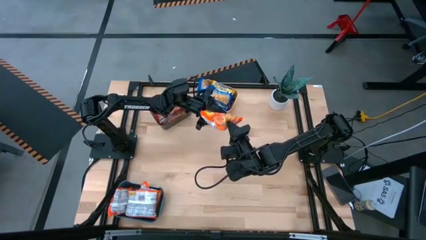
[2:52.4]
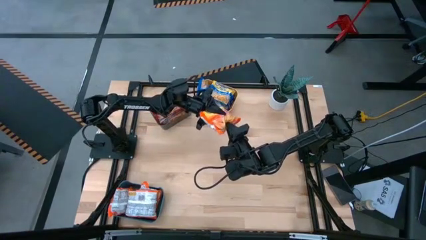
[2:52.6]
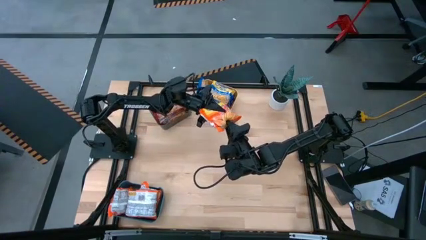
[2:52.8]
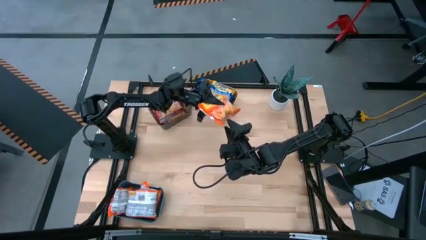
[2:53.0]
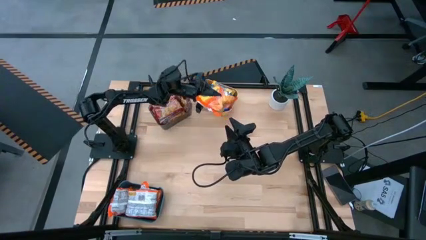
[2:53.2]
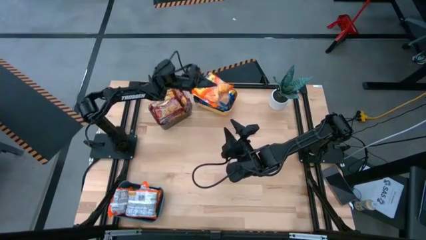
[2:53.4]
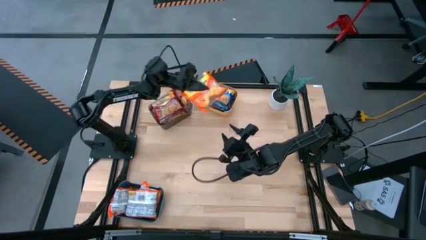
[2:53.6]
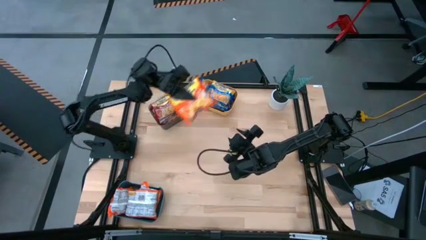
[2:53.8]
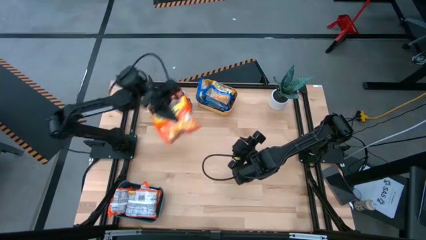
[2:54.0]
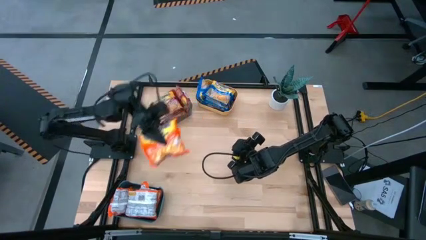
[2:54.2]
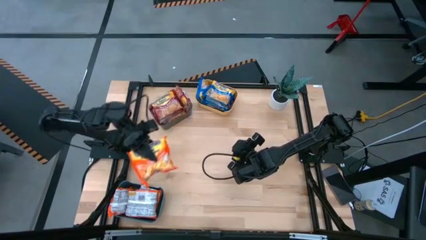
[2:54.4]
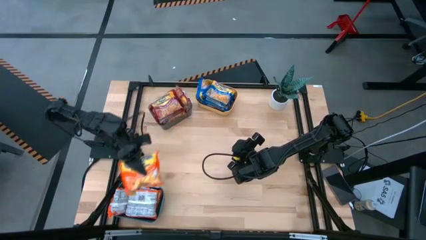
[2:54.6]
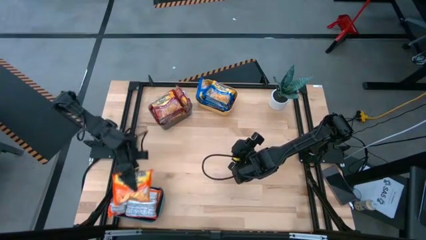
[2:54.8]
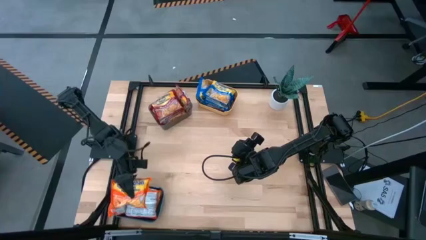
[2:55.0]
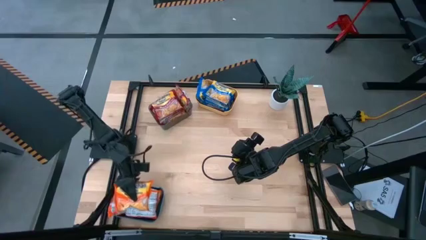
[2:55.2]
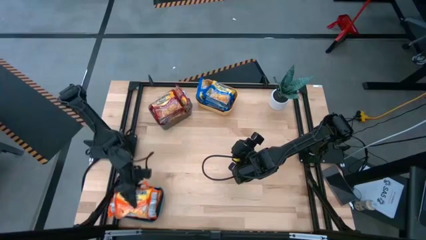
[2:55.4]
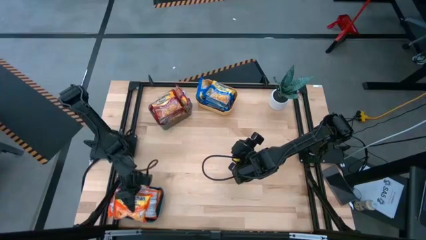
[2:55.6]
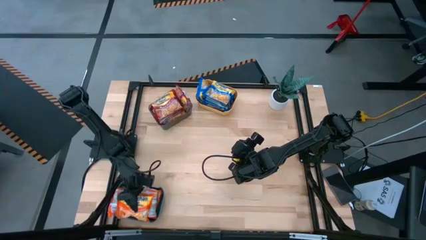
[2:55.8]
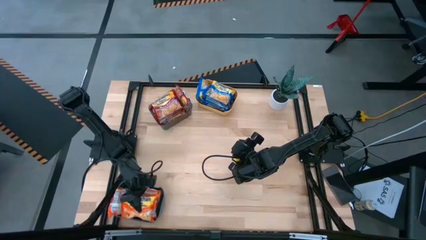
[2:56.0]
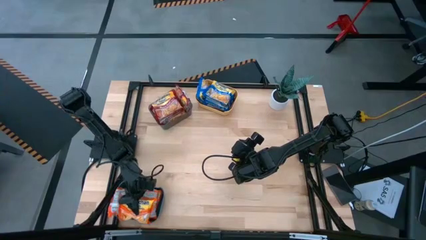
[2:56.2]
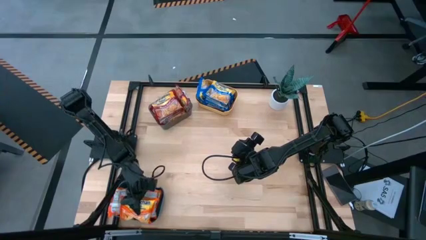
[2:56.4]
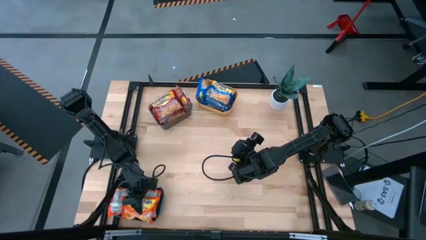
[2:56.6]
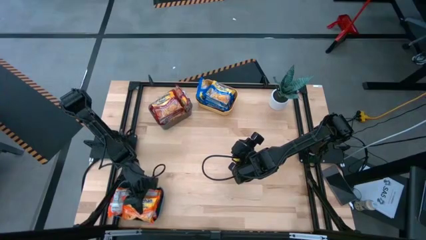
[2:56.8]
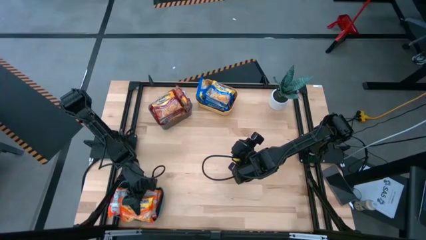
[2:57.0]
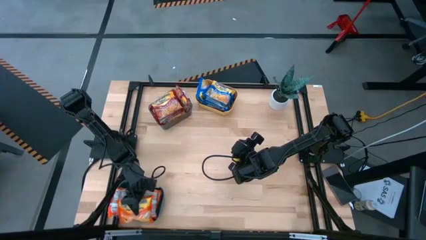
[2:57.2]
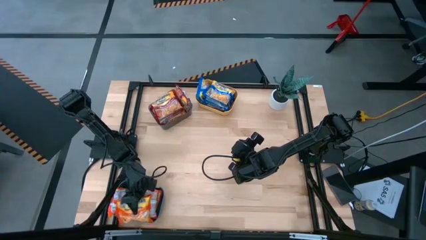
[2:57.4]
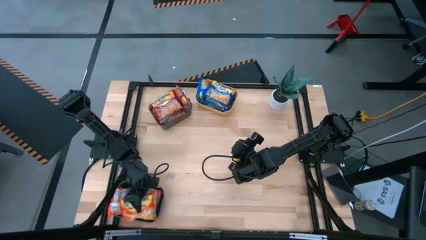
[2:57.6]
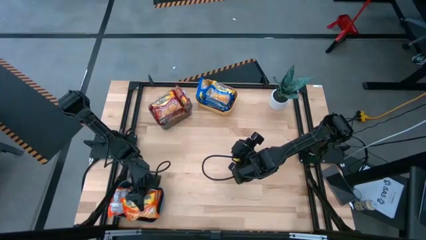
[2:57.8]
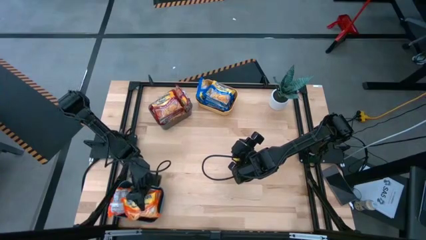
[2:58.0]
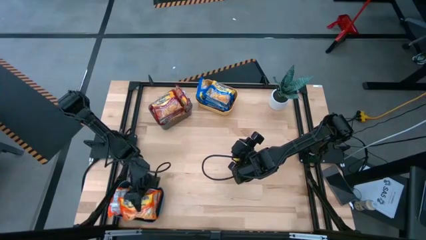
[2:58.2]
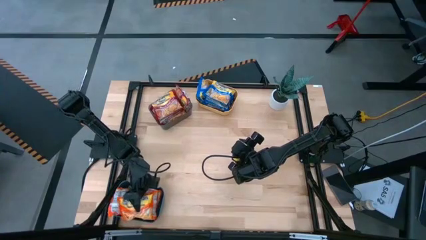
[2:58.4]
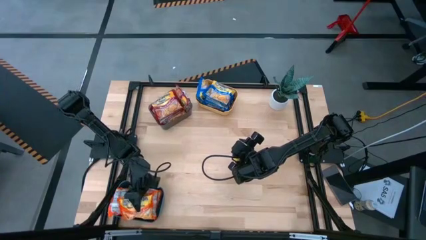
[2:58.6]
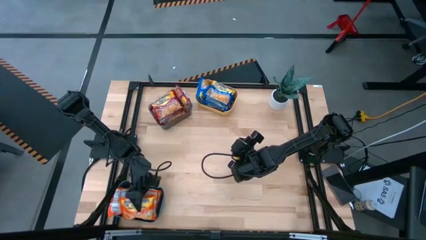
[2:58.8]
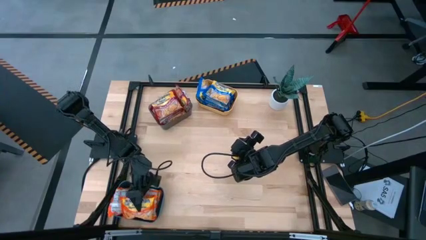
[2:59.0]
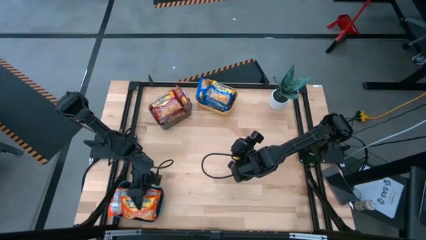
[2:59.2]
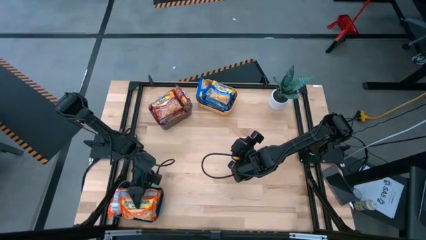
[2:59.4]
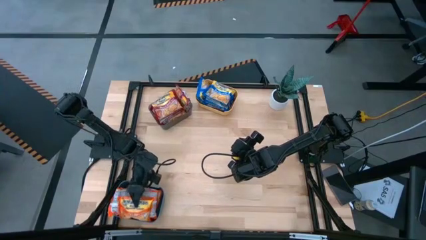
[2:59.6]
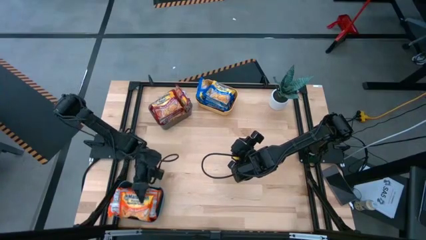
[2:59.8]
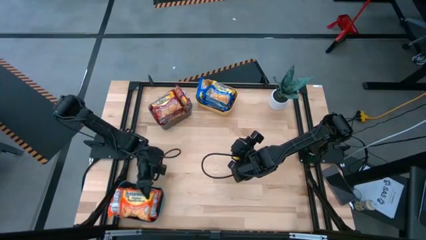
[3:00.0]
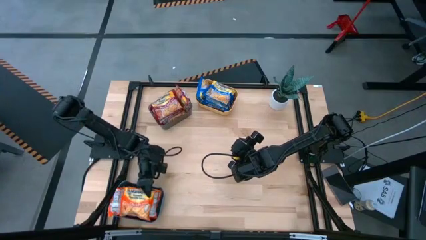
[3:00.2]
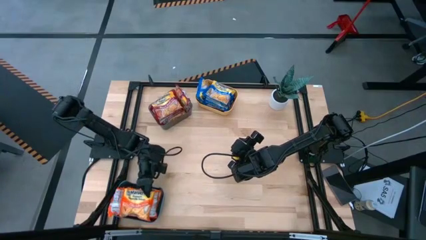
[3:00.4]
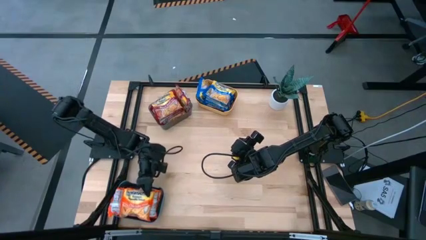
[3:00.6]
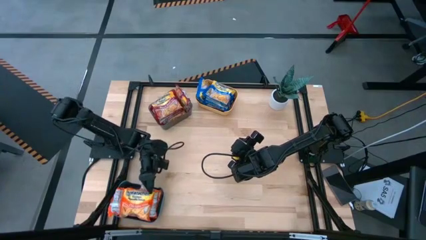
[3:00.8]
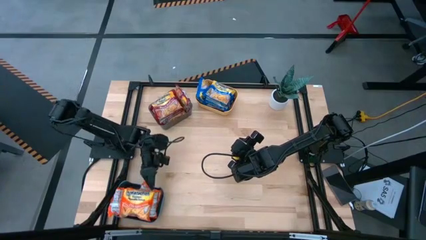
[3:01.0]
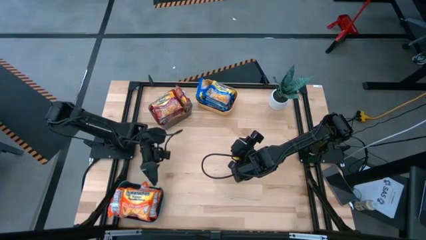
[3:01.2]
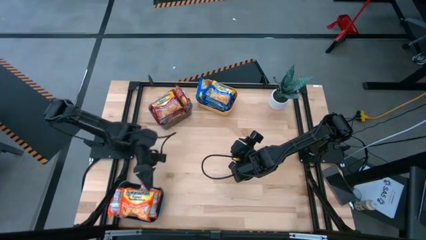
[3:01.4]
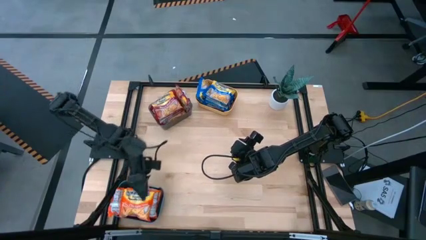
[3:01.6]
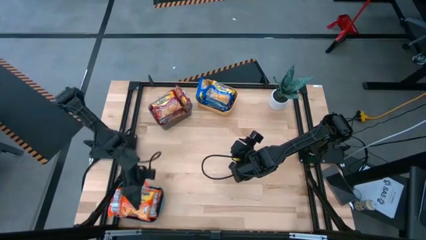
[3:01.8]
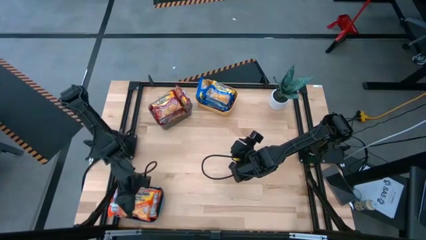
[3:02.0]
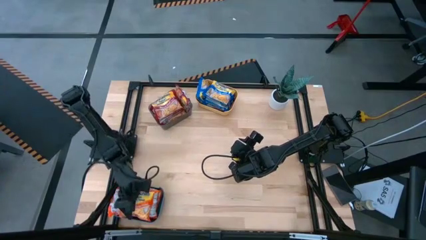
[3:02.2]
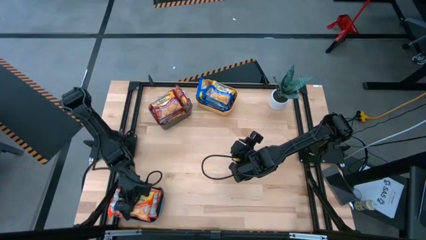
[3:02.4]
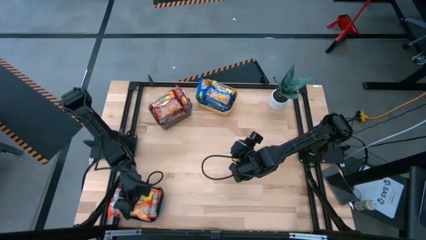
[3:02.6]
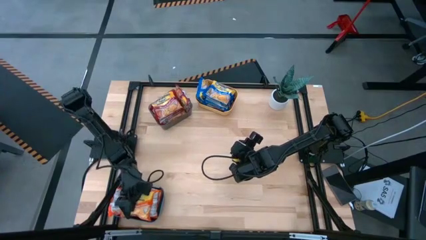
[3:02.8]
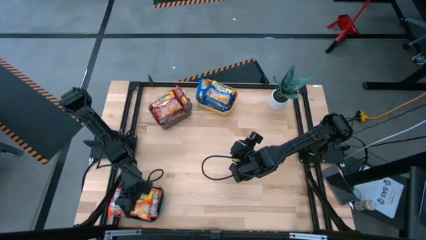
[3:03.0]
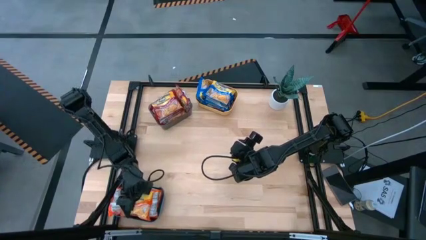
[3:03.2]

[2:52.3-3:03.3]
Task: Sort Maruchan noodles
Put the orange noodle pack into the blue bin

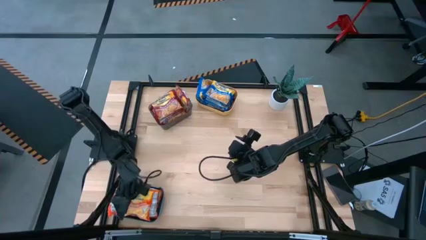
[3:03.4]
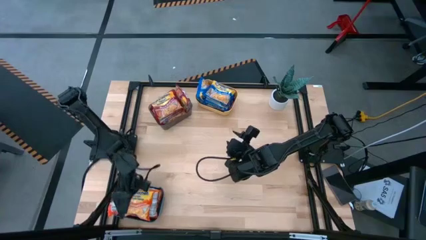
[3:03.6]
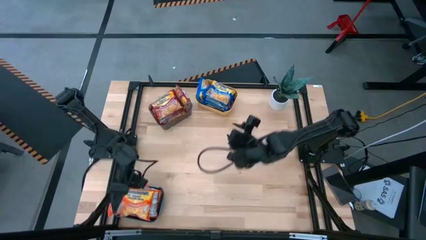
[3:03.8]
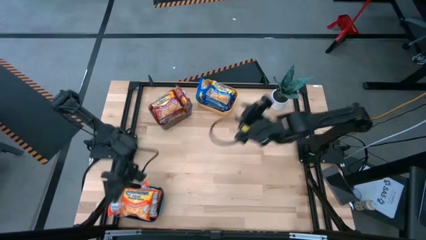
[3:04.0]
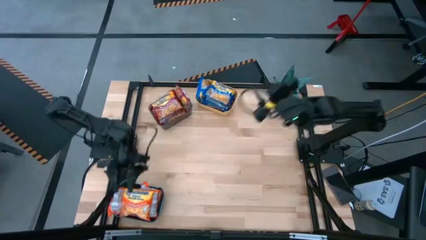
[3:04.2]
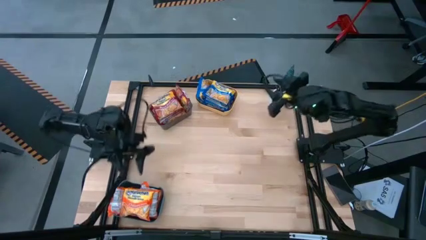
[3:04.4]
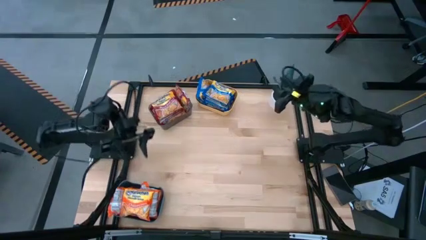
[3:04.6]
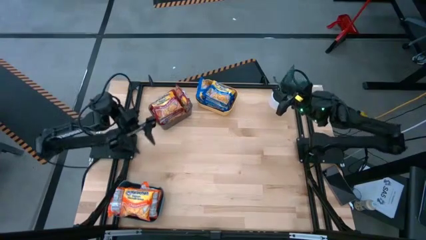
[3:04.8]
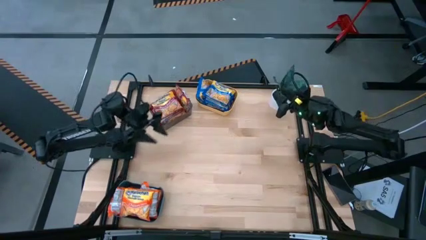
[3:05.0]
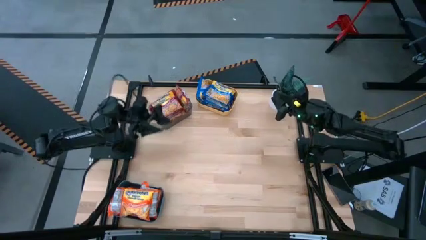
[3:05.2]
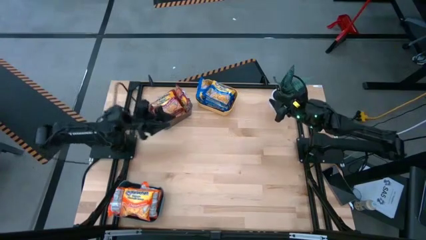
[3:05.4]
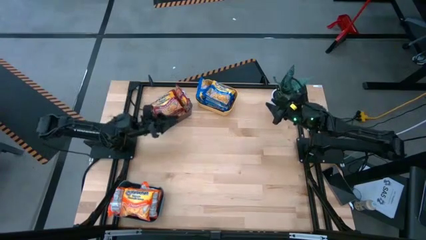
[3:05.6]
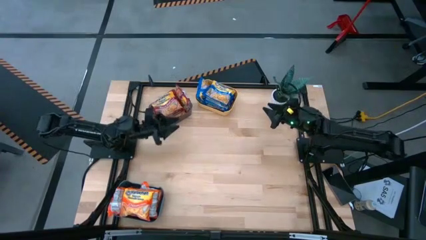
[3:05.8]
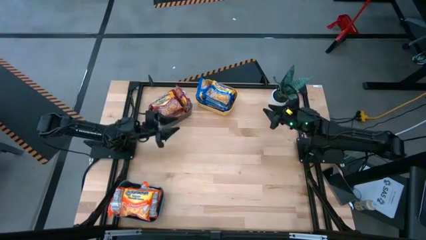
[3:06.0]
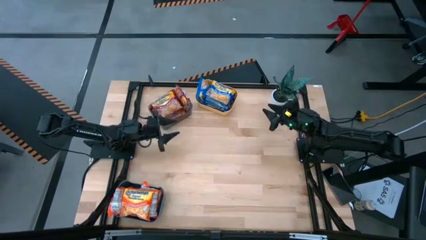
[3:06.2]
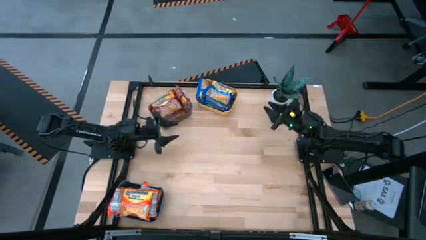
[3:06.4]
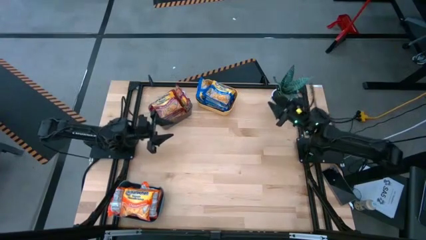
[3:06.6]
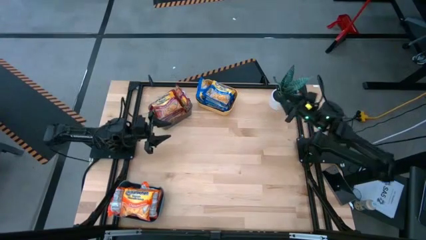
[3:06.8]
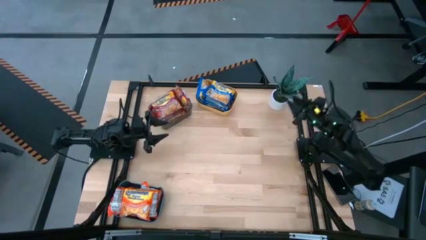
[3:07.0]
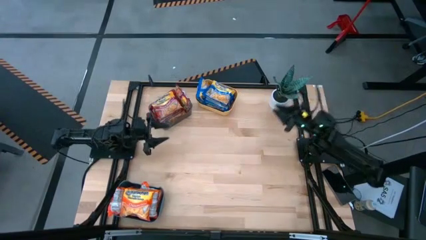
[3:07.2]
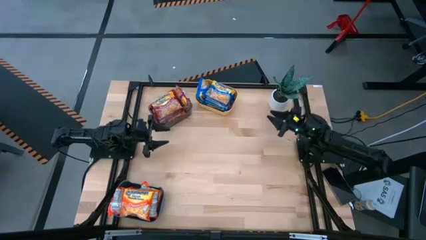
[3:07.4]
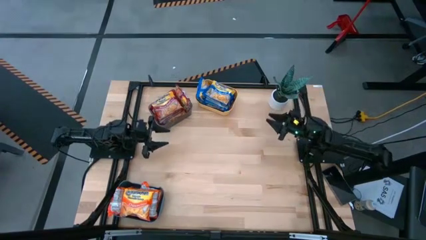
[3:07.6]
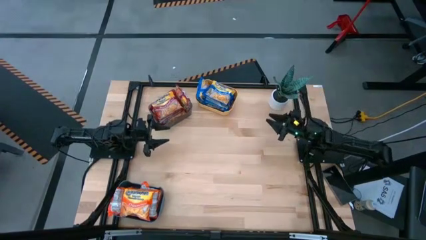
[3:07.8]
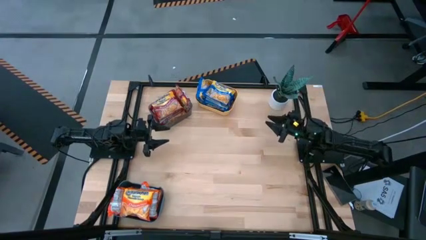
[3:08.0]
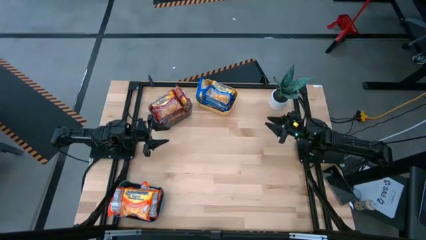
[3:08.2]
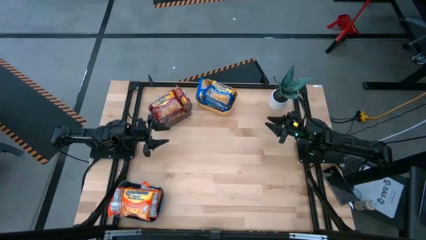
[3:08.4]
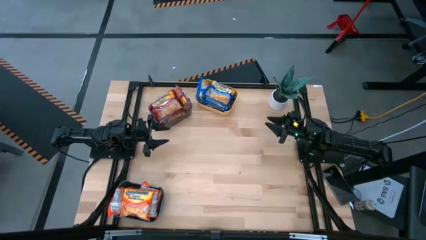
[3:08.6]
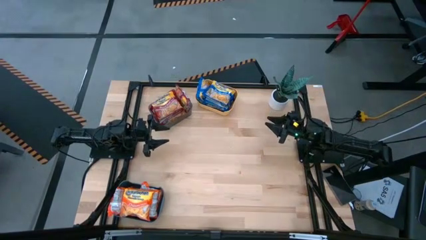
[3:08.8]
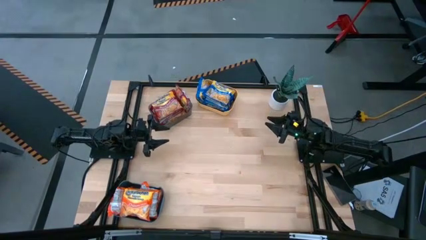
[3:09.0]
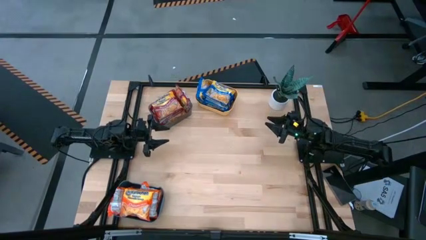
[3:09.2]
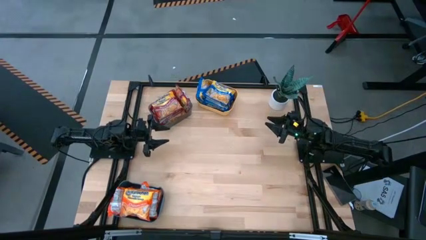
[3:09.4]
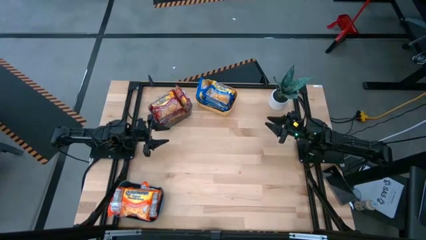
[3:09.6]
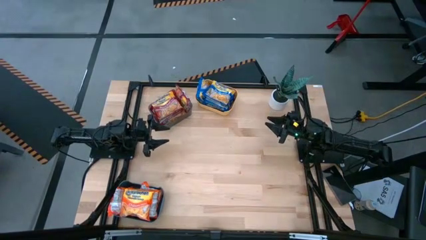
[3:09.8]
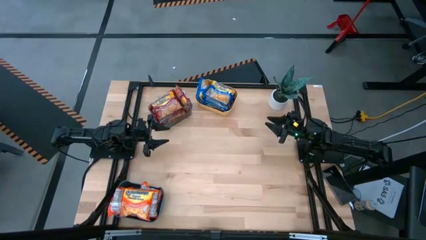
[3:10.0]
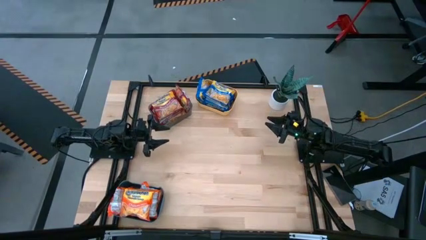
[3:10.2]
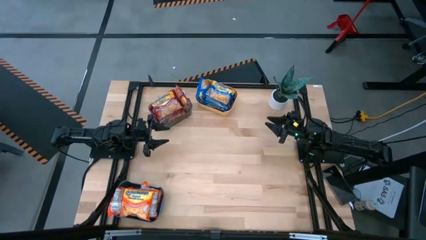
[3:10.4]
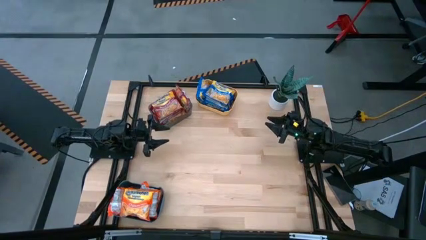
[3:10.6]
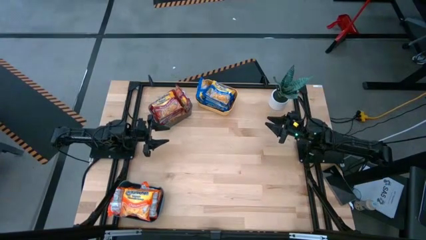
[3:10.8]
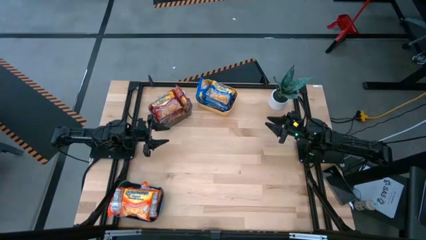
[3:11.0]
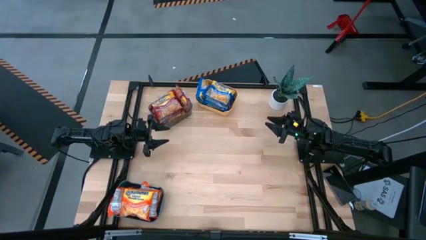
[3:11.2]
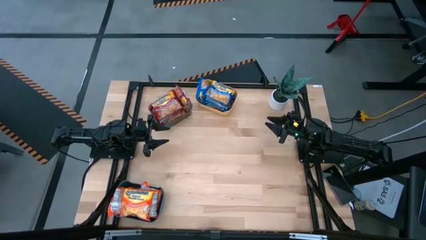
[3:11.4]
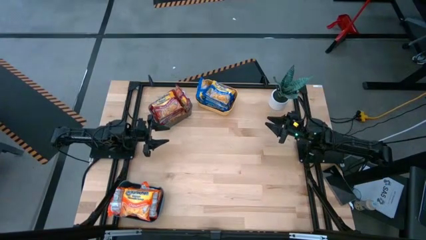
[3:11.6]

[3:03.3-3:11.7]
Return to Home Position
